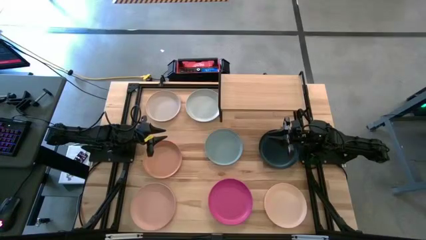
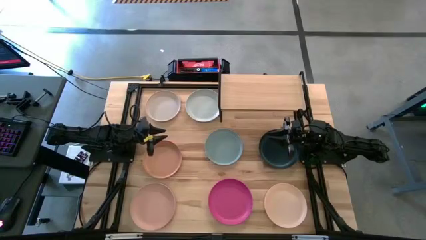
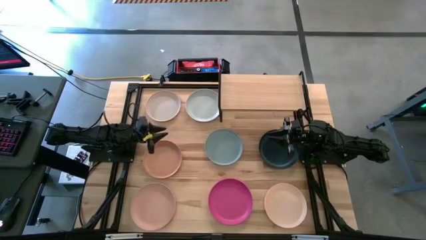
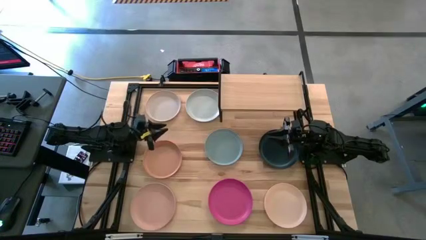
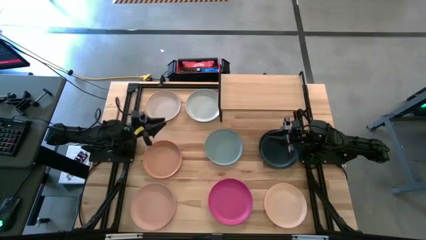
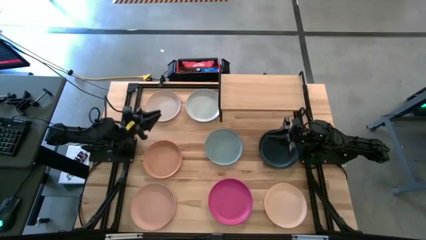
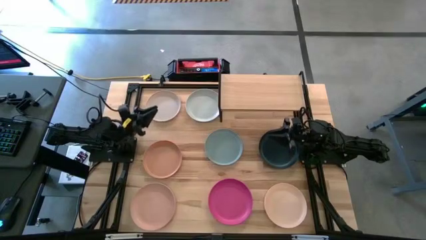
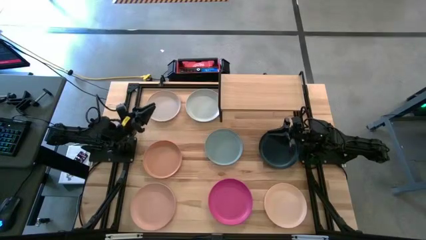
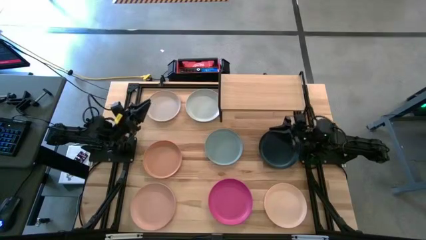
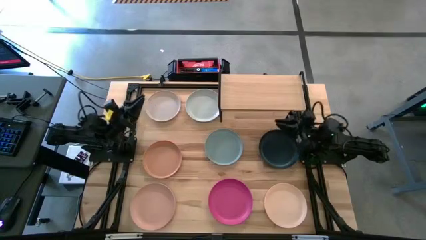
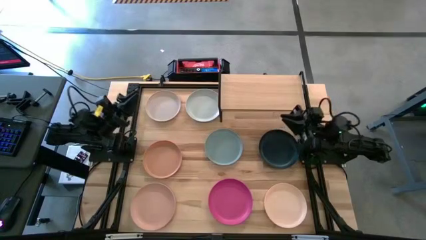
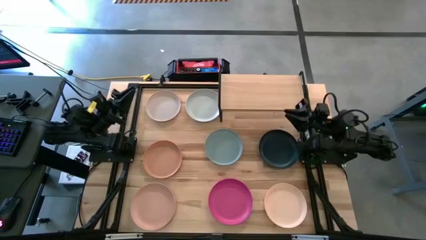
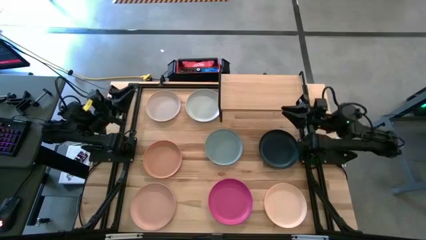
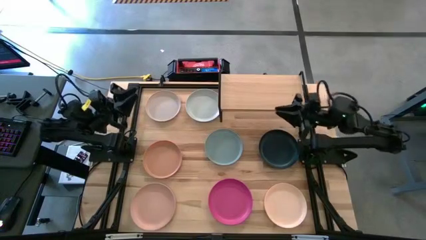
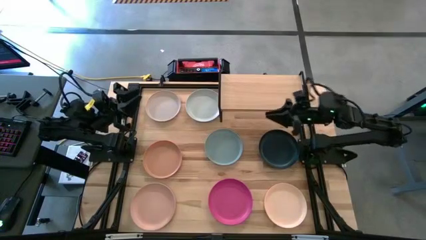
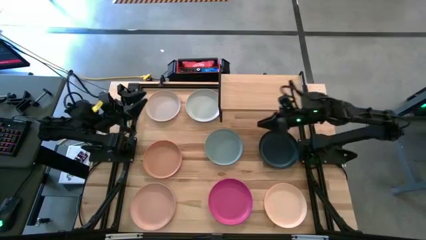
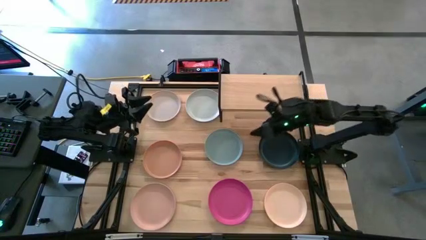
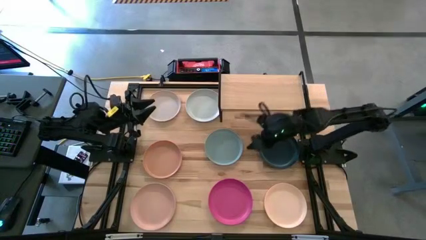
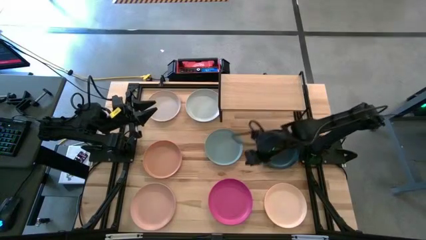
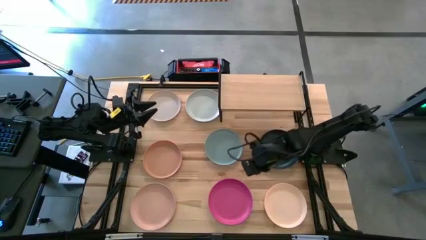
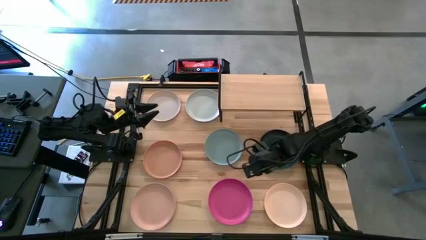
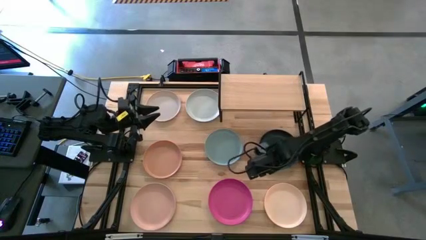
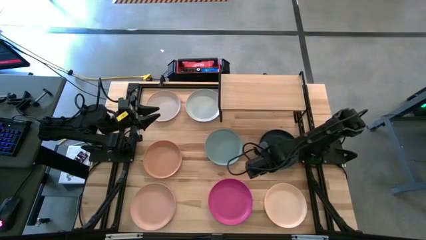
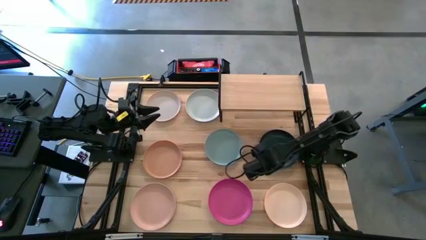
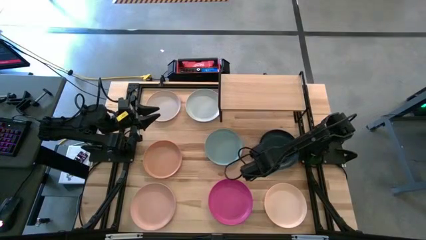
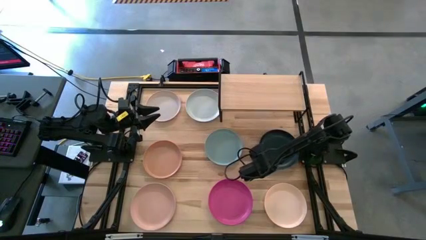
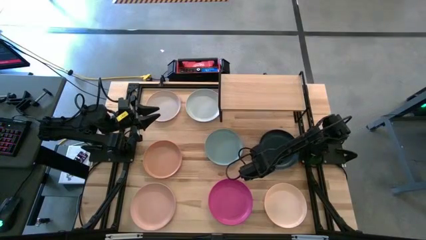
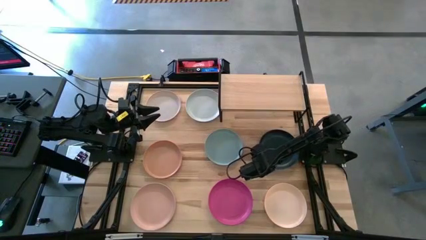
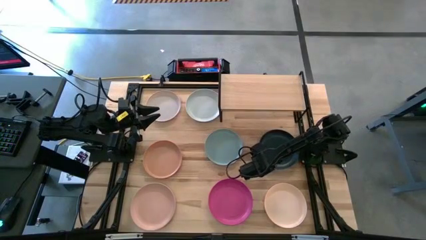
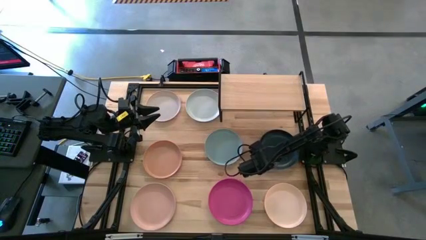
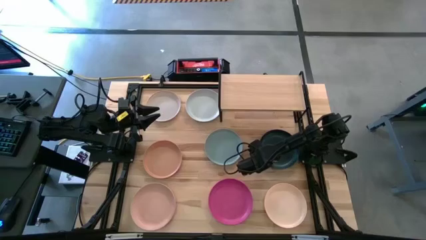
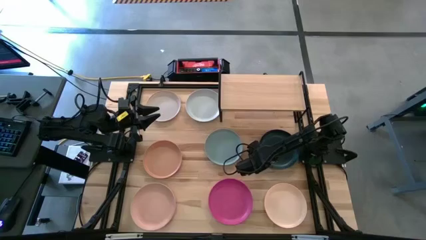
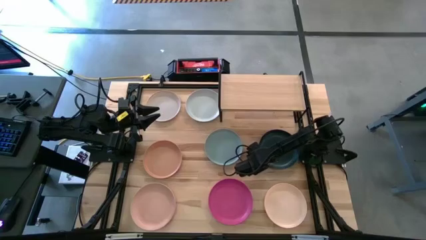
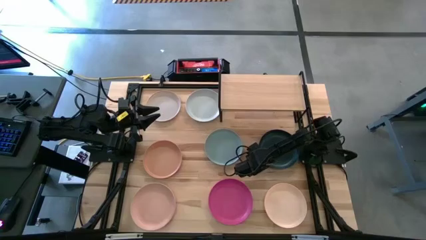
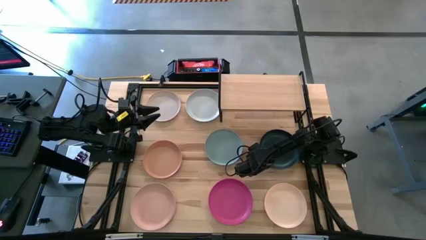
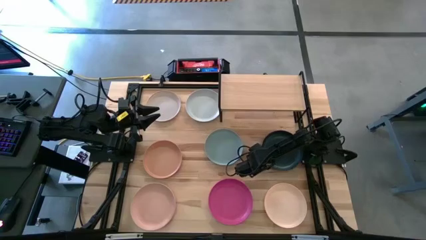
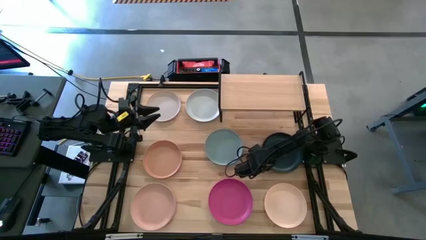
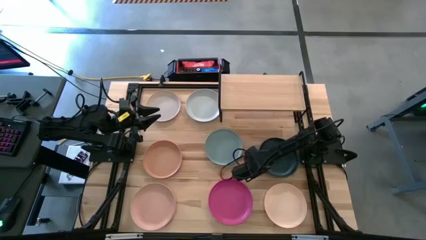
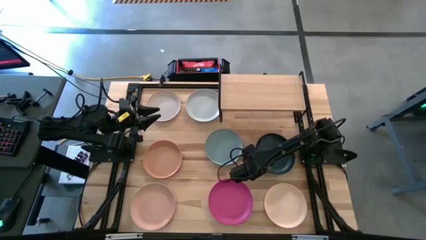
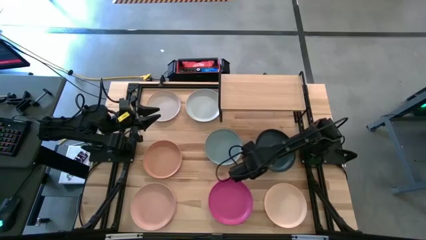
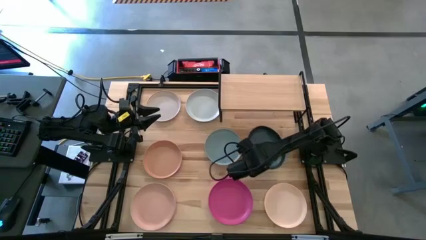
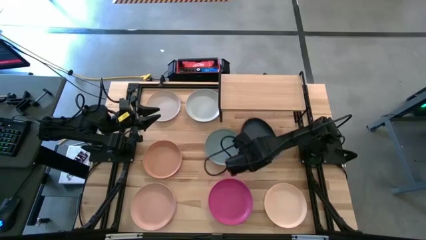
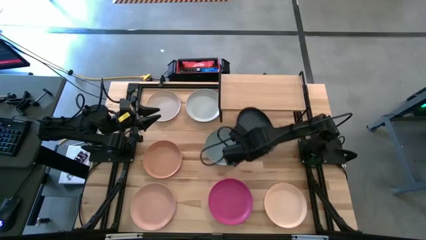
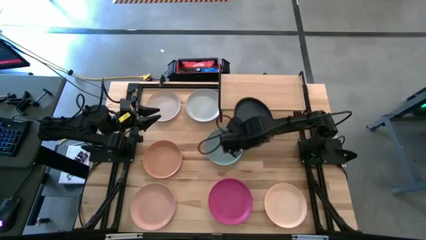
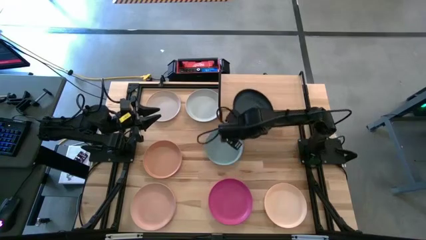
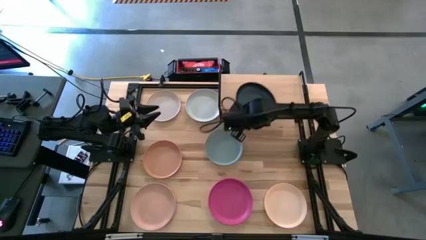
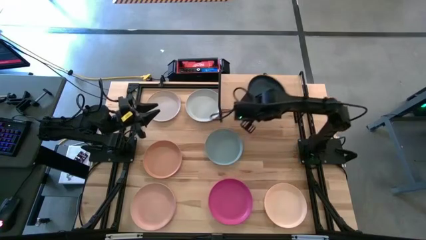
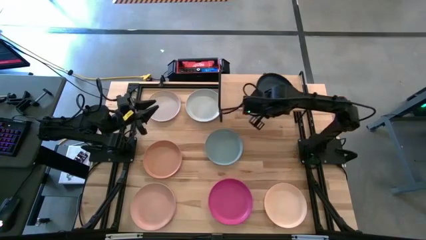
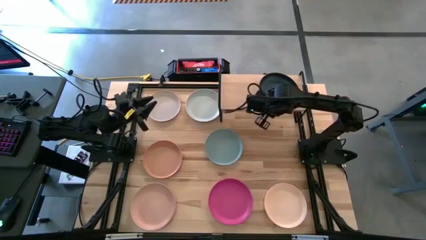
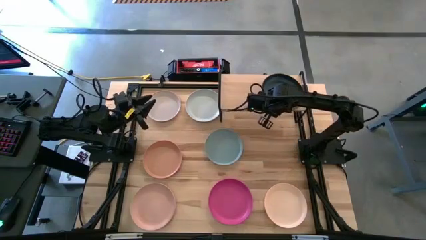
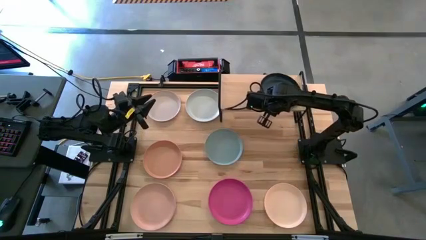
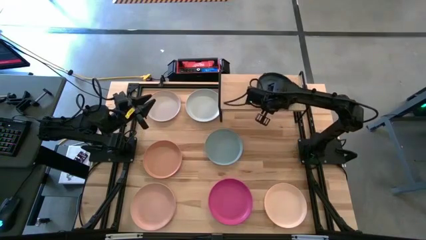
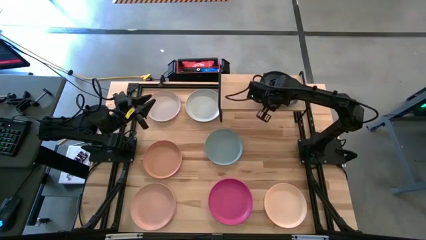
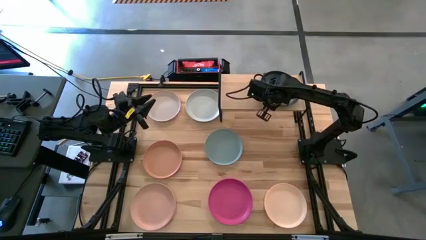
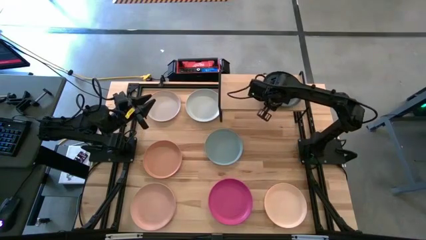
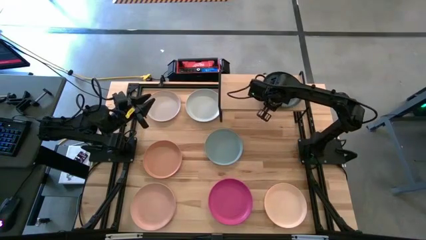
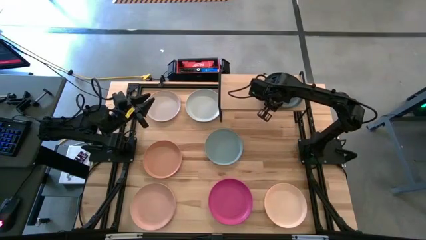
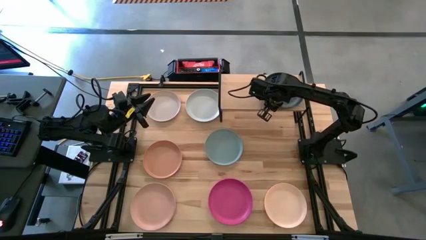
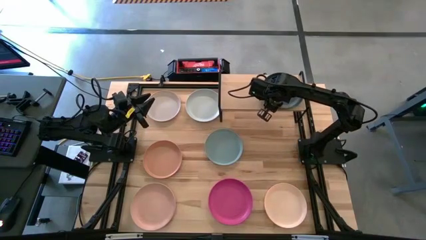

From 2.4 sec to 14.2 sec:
Task: Place and stack plates onto a shelf
Put the black plate on the shelf
